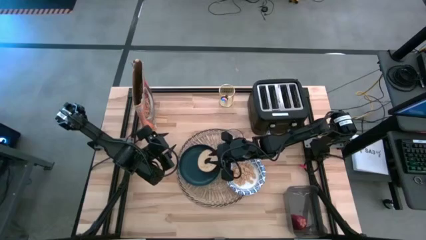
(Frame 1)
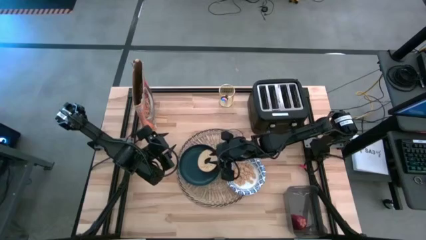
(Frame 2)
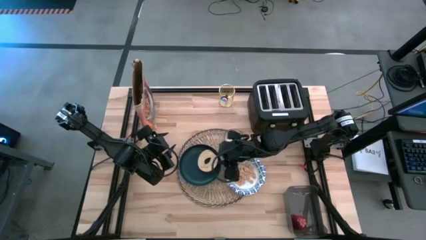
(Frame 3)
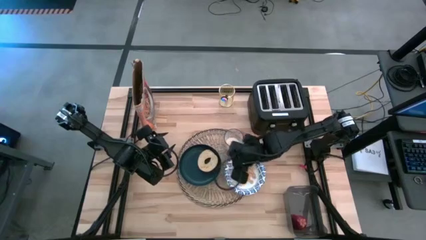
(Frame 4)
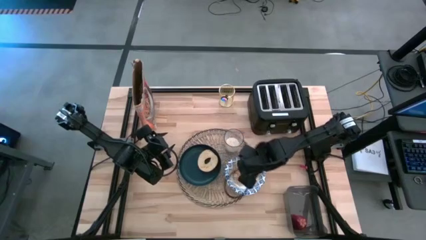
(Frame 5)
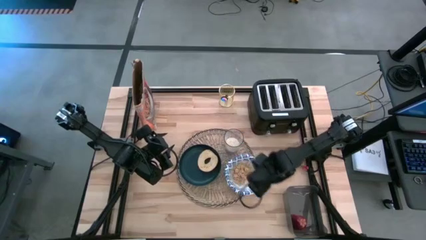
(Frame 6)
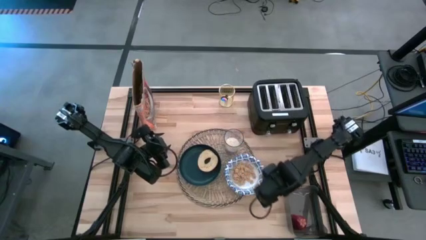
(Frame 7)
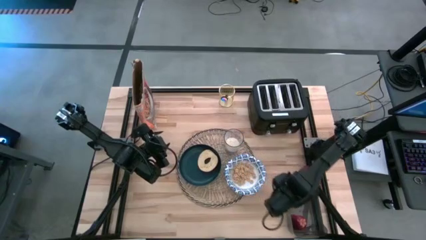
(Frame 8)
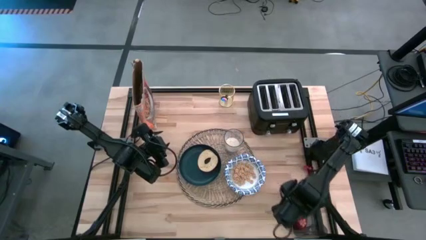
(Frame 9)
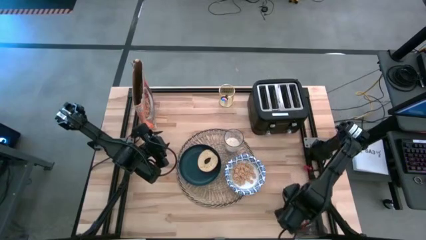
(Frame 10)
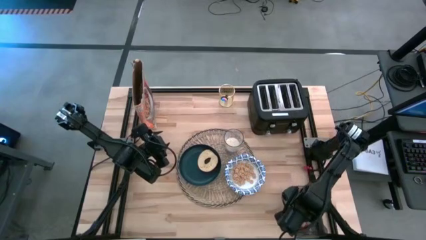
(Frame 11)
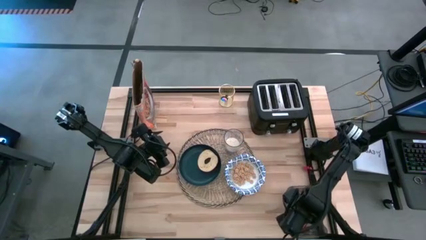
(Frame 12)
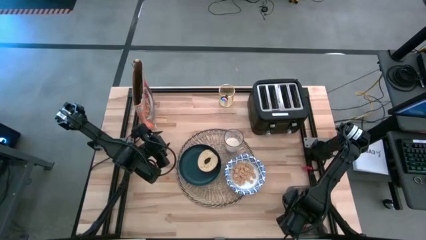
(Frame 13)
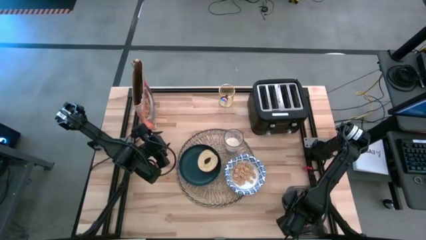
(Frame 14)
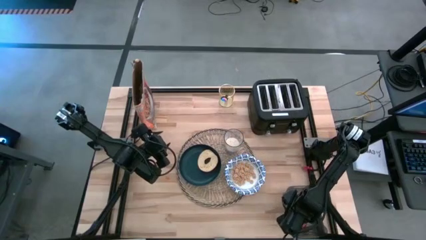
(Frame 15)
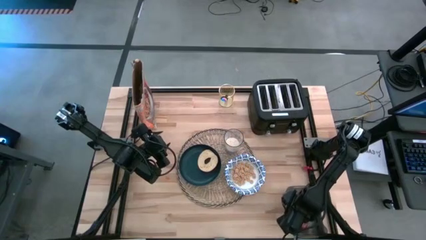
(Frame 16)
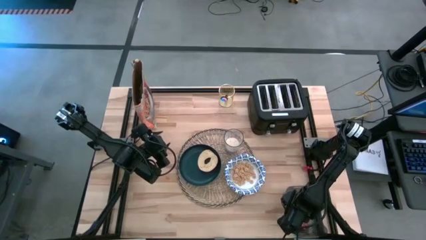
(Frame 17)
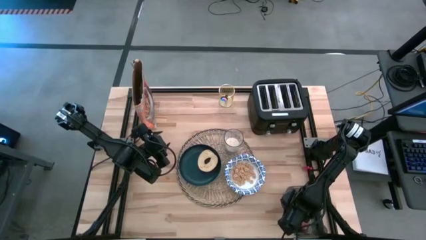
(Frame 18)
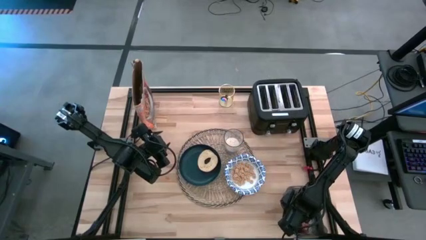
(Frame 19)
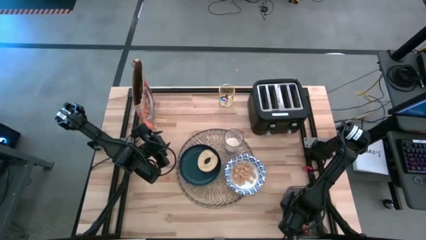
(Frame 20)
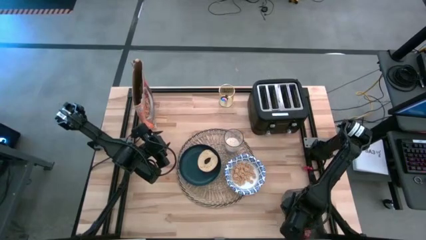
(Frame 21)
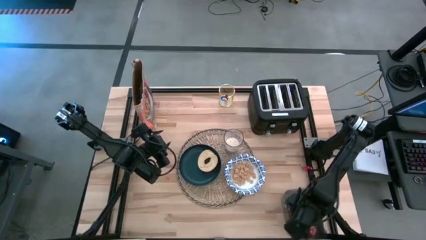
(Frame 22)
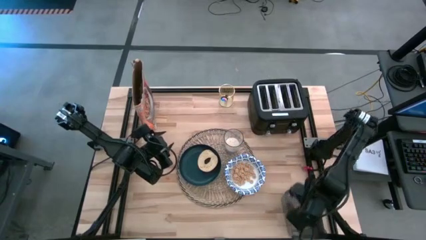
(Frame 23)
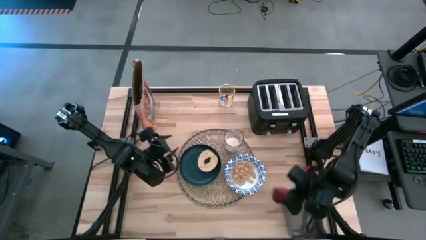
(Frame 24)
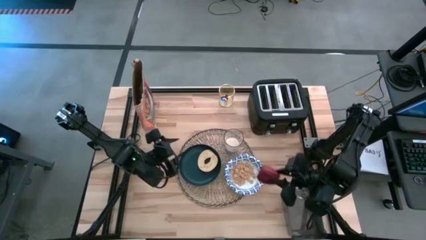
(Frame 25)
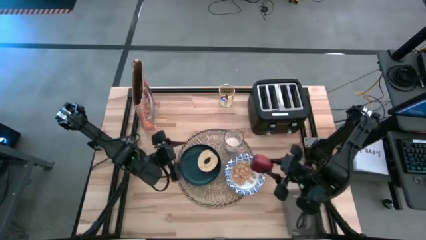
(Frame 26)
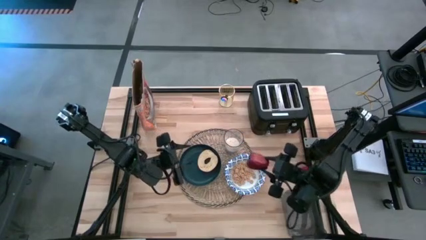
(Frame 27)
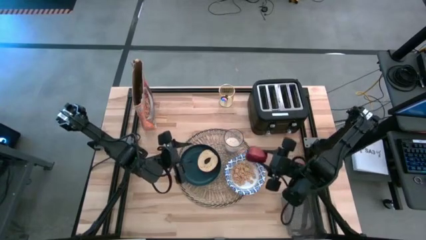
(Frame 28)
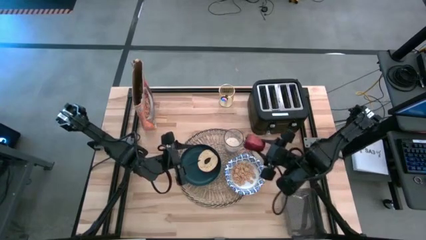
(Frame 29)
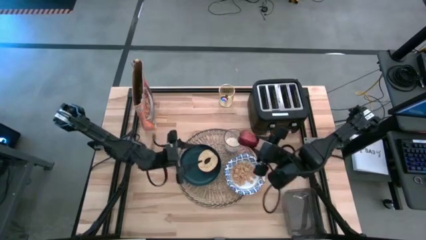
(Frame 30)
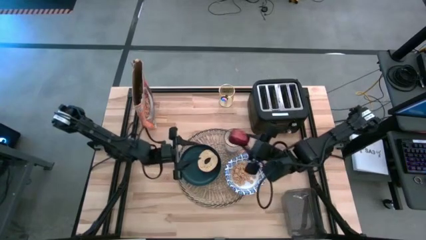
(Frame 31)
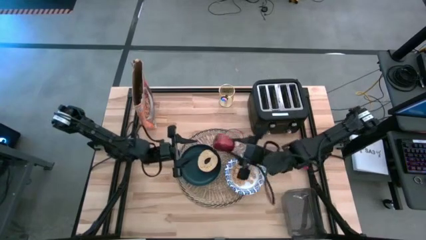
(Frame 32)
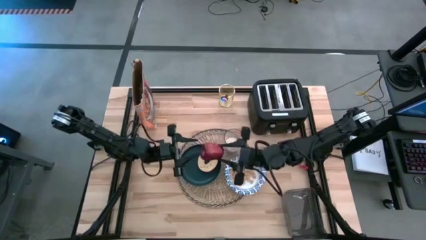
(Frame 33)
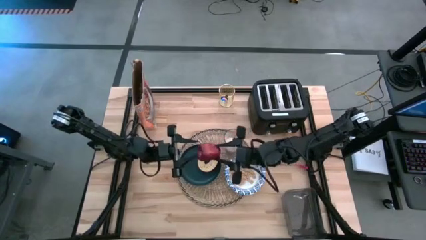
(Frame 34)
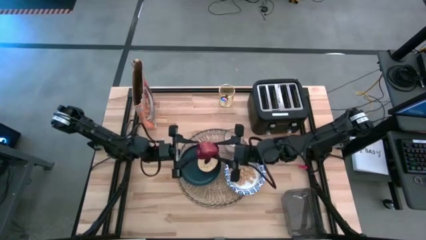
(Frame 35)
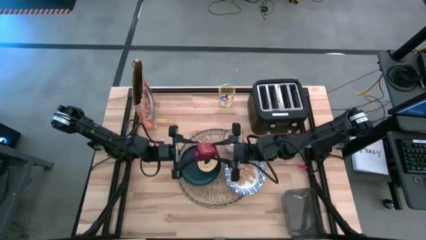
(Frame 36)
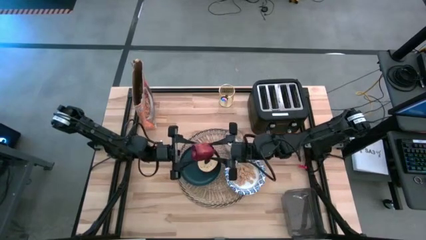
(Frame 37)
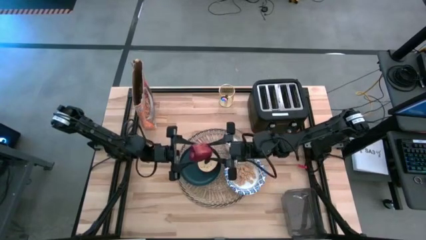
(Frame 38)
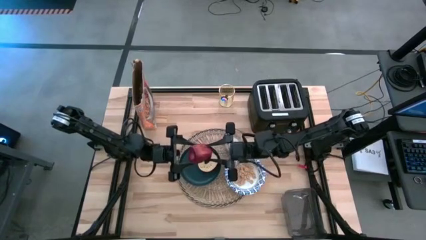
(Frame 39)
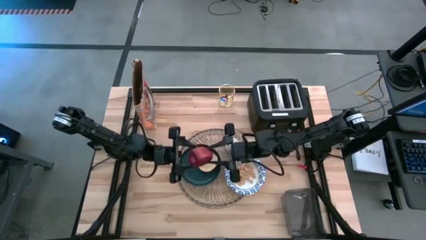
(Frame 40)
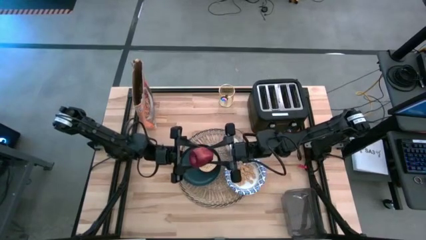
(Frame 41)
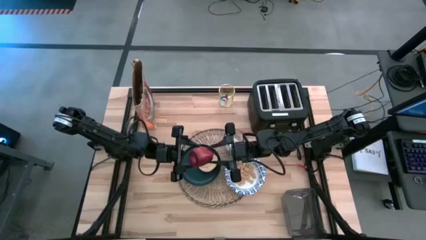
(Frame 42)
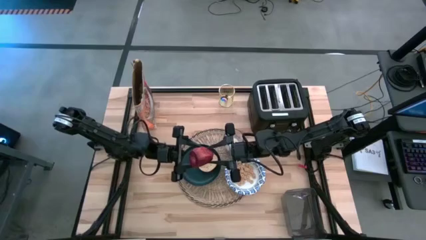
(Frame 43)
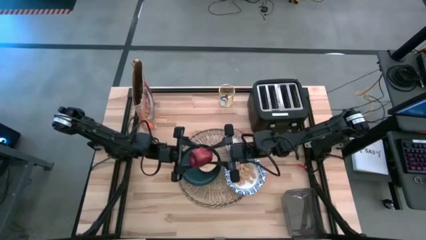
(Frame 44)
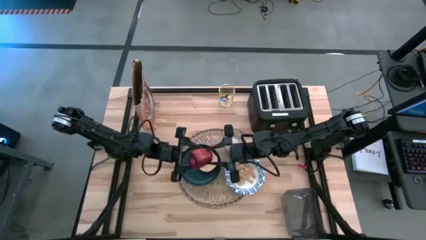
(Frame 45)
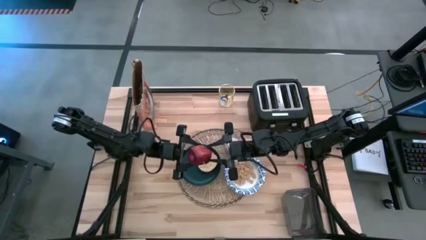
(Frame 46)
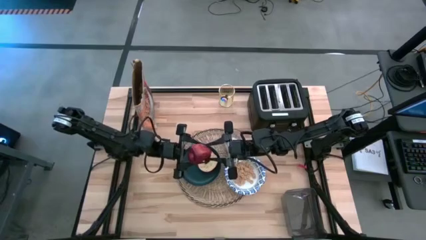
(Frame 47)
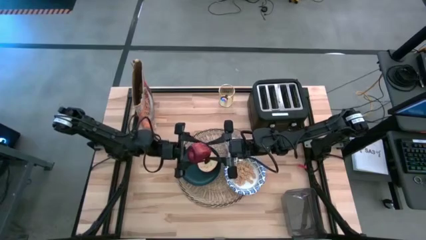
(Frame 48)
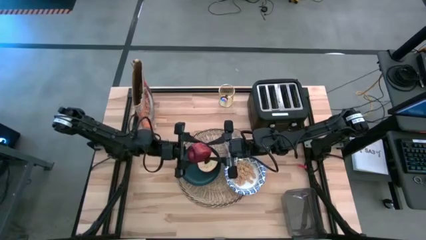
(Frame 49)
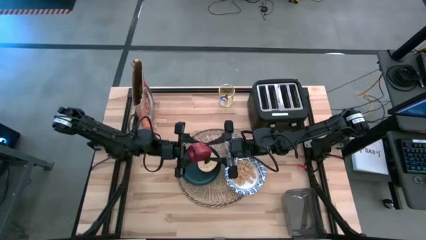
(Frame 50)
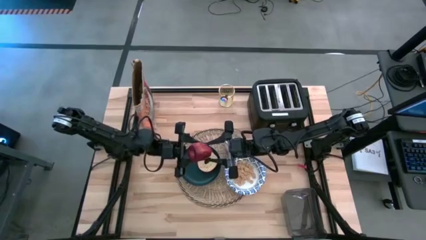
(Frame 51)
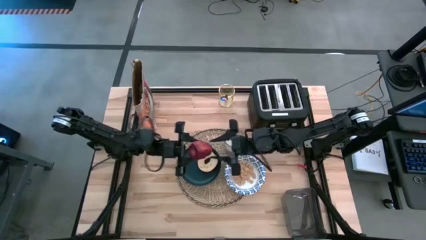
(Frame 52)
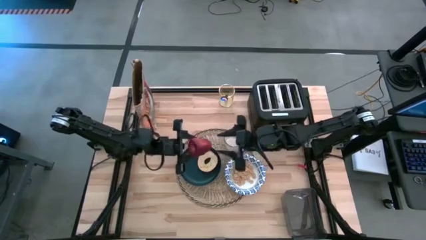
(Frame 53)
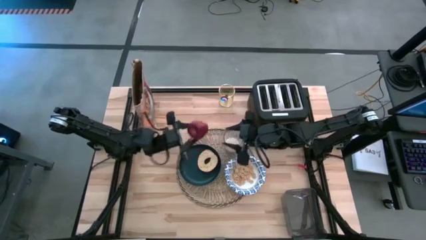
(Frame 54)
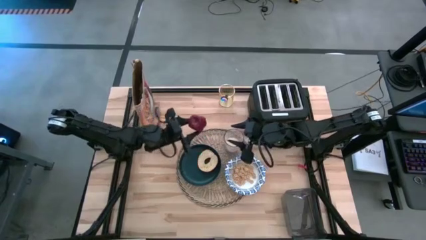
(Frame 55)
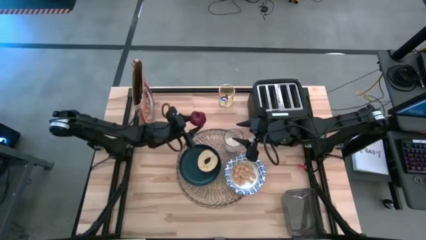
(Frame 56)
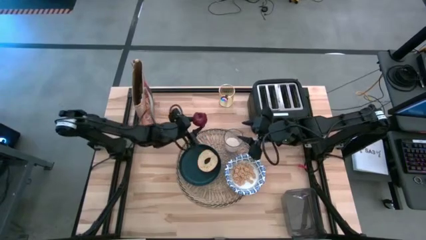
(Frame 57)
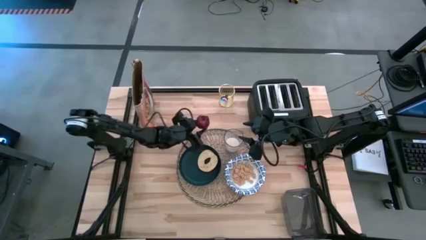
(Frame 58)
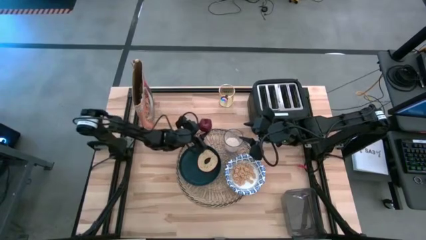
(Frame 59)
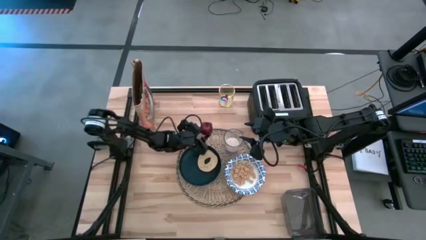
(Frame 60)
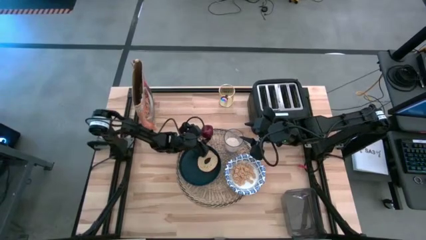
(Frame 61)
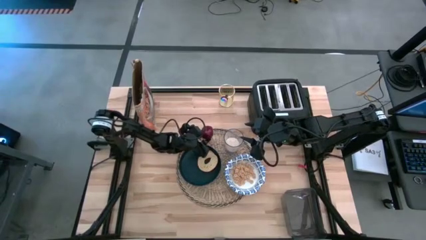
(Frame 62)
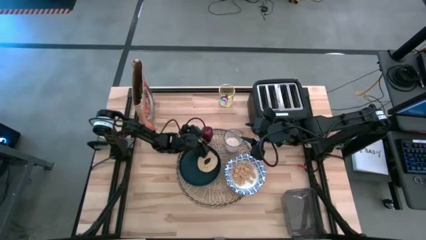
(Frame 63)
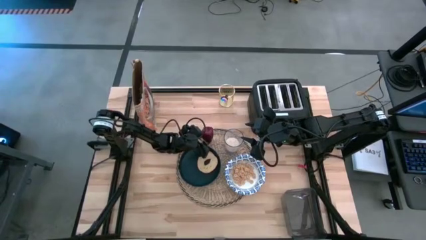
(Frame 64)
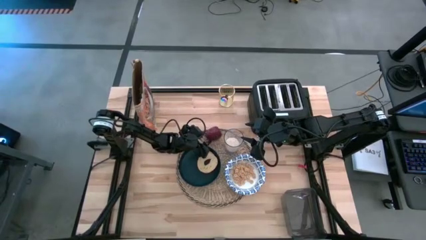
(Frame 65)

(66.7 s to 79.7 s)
Task: Arrange a breakfast setting
Put the apple on the brown placemat to the top right of the blue plate
